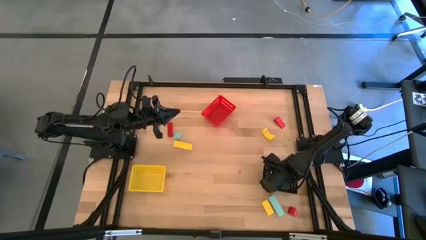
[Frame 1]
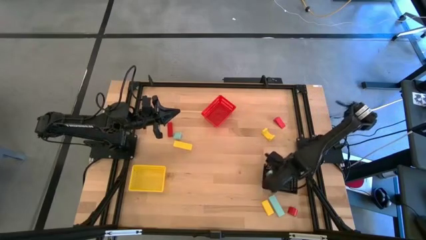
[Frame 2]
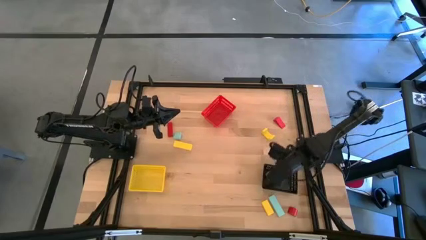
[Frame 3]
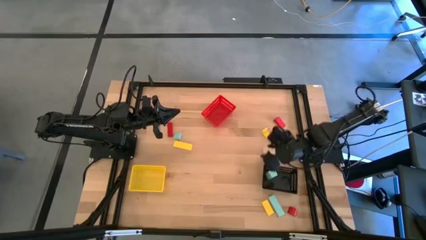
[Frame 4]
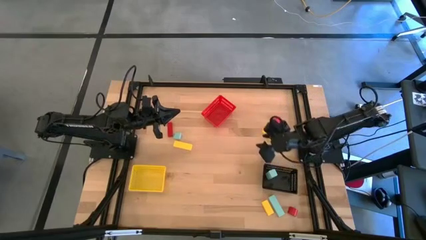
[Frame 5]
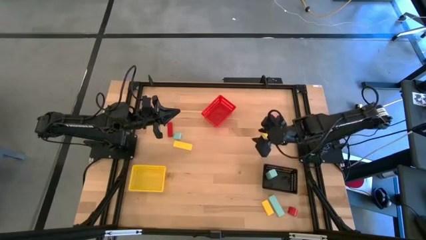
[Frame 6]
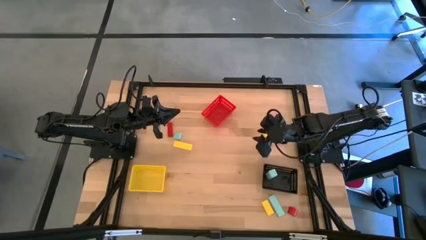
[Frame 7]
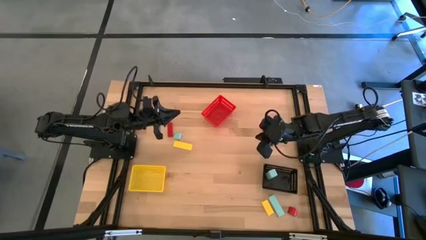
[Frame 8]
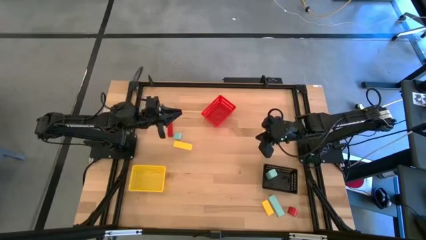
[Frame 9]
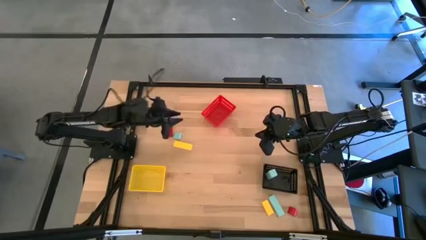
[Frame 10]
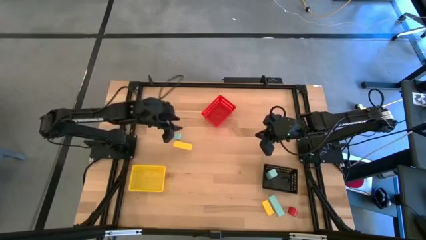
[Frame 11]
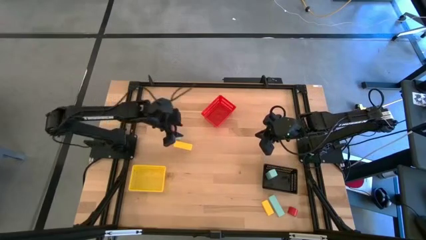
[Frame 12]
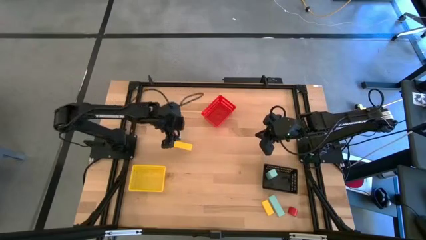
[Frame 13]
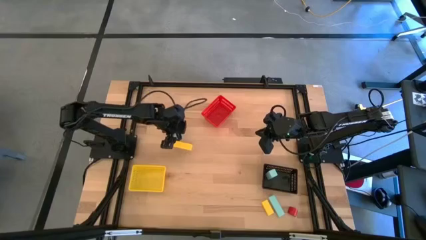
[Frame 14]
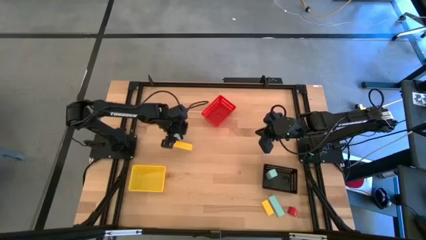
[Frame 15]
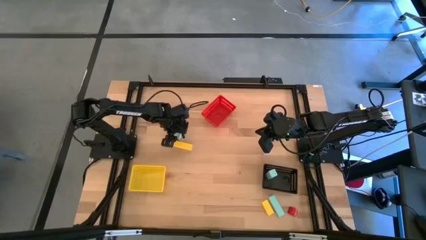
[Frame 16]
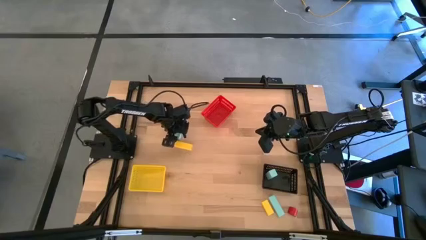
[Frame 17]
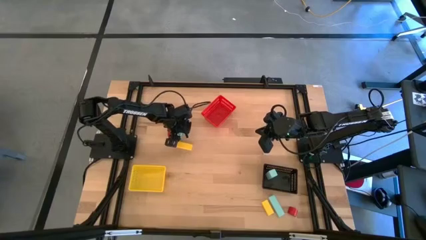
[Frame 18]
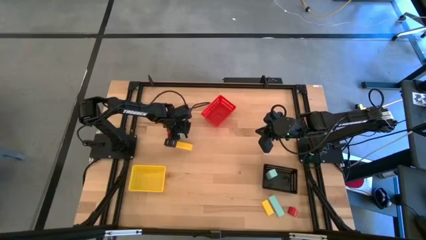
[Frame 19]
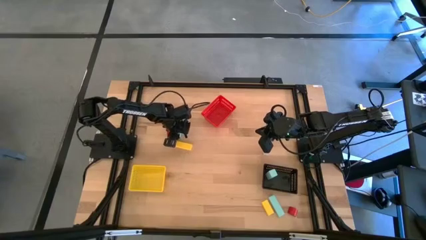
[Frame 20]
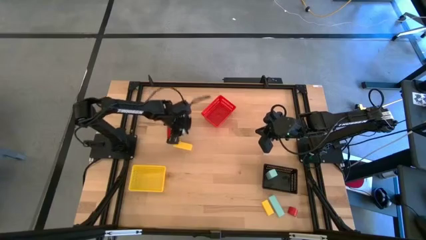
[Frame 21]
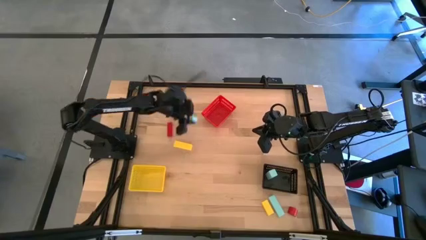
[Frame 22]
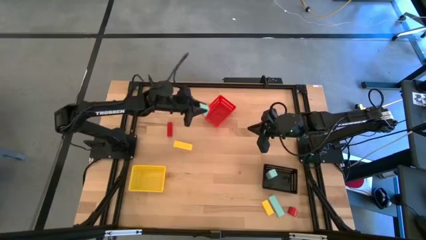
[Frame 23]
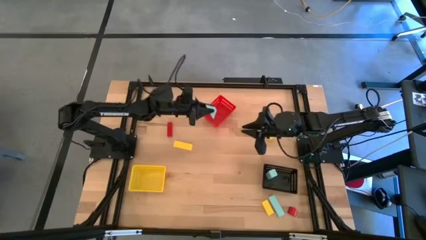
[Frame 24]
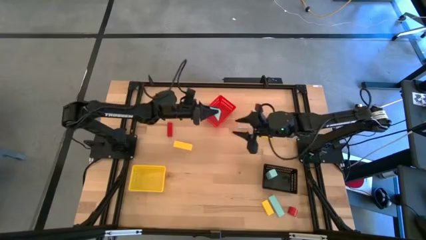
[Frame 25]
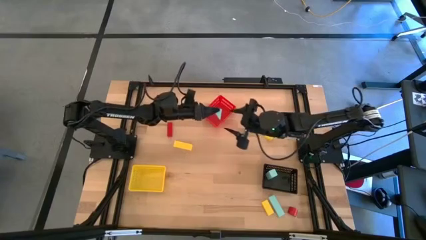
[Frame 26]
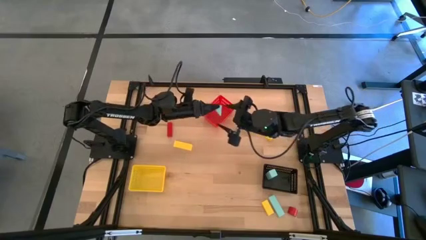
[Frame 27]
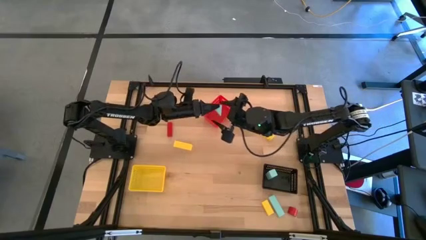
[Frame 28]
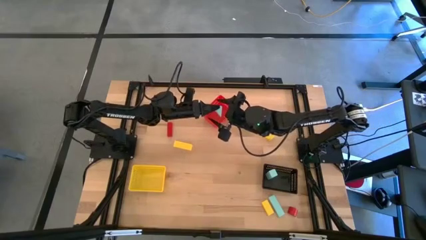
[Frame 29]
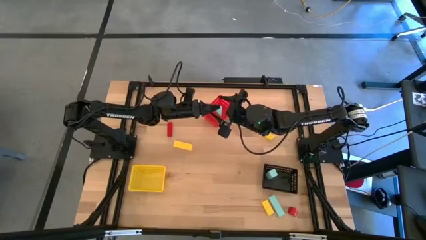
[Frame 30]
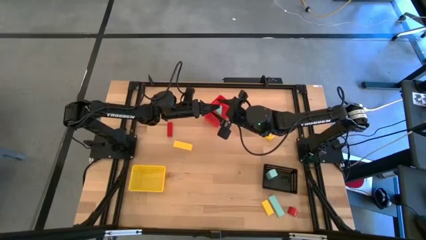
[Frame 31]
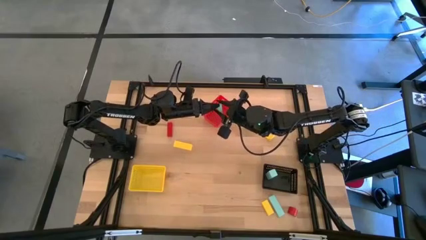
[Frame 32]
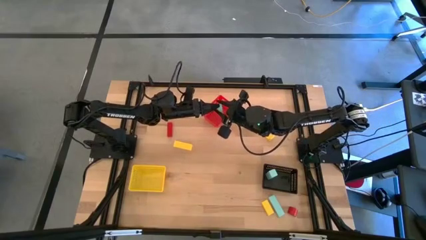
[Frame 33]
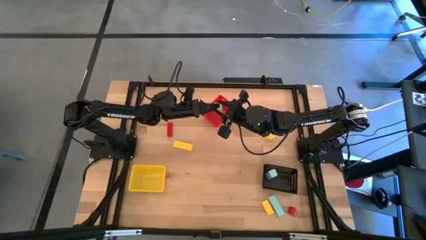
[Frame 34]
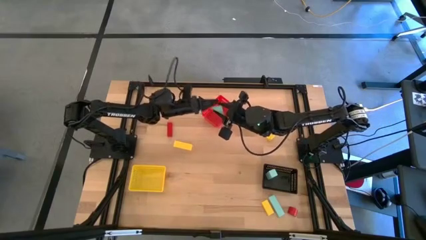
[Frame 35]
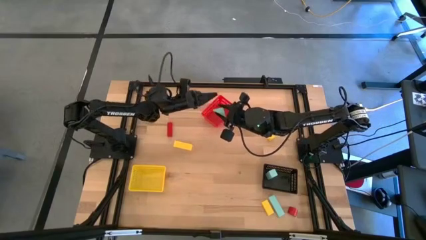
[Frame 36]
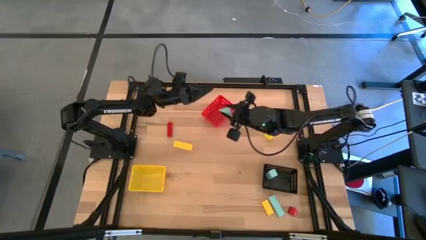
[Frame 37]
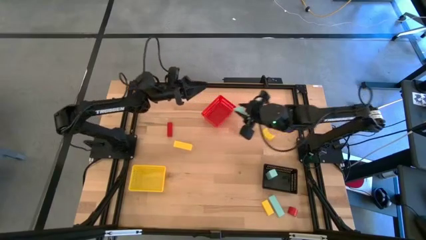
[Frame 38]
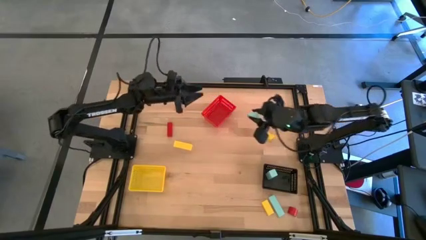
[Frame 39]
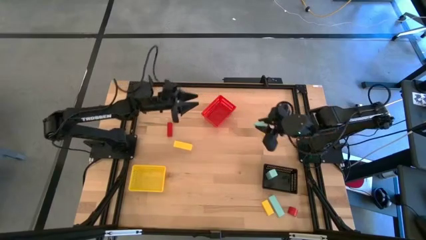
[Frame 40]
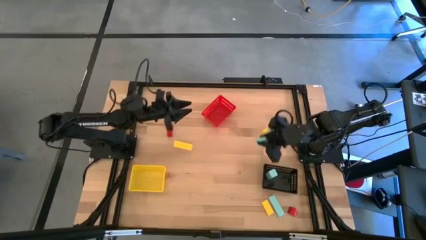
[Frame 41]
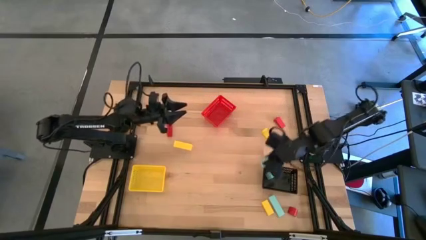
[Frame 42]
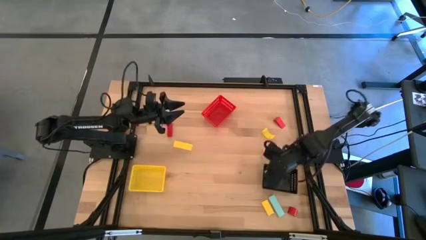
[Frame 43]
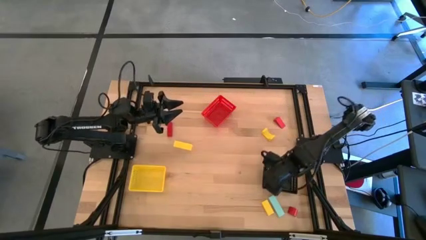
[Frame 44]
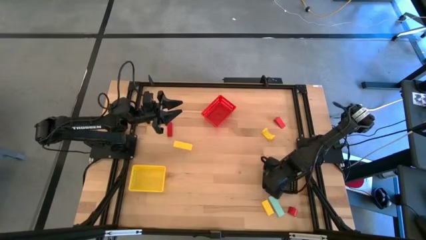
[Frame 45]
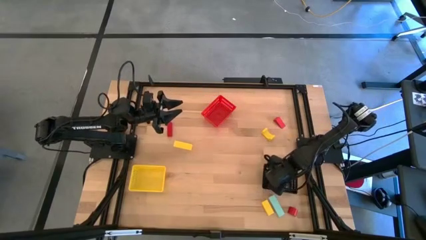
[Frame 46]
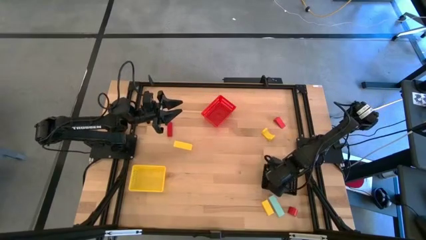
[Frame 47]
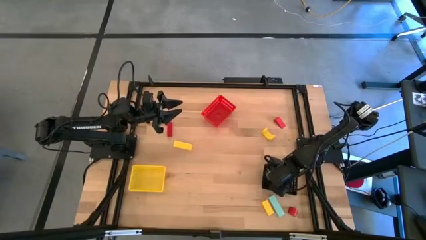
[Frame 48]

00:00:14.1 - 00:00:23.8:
Task: Sort & place blocks by color
Put the top light blue block into the black bin

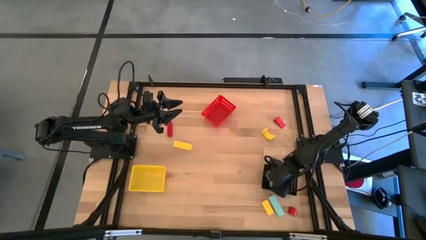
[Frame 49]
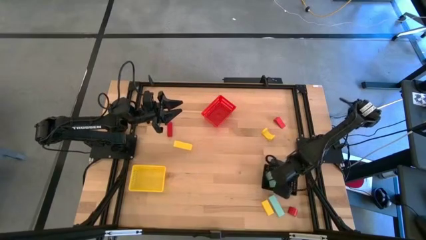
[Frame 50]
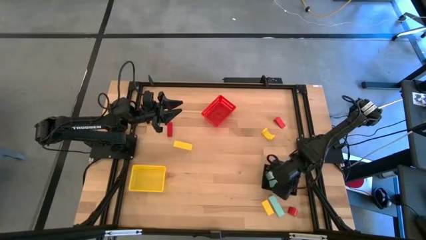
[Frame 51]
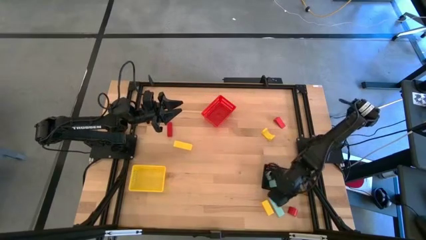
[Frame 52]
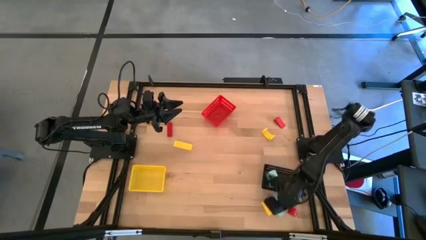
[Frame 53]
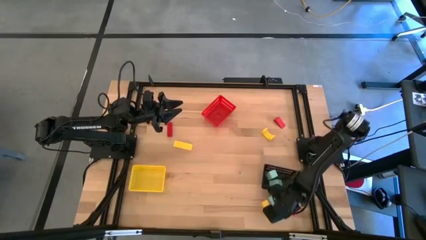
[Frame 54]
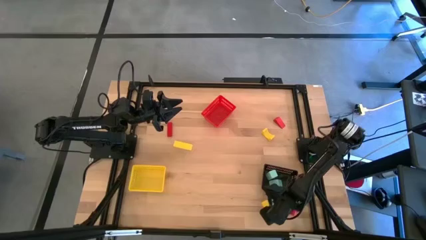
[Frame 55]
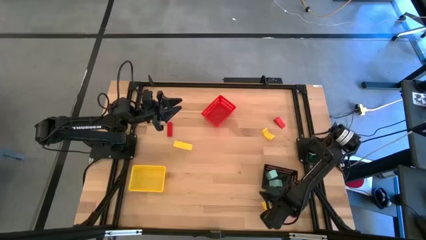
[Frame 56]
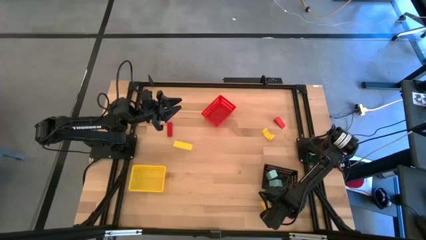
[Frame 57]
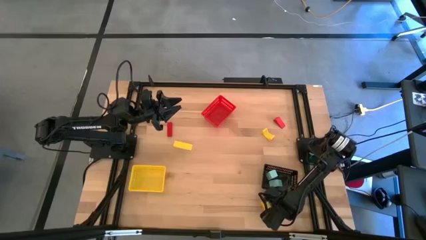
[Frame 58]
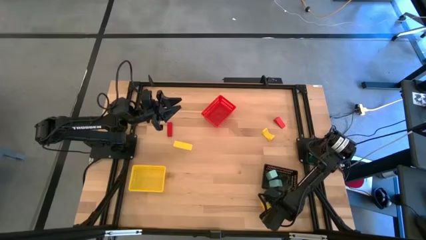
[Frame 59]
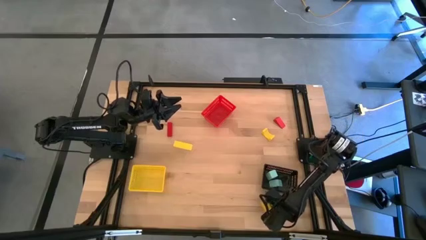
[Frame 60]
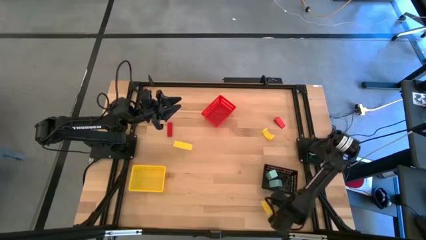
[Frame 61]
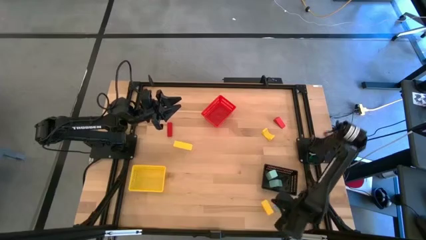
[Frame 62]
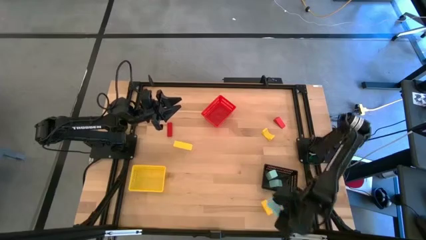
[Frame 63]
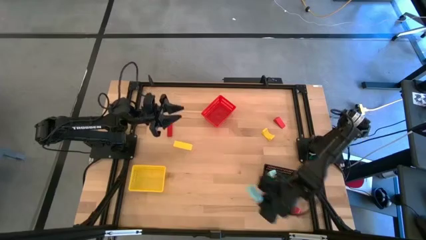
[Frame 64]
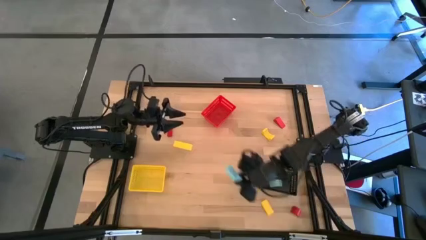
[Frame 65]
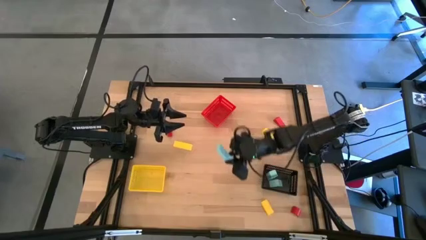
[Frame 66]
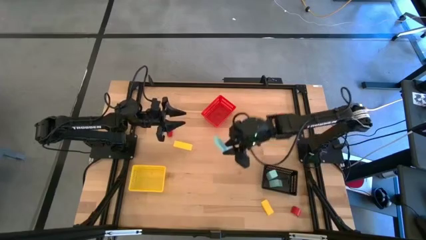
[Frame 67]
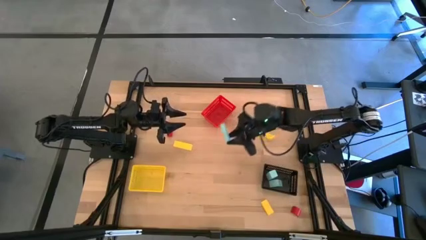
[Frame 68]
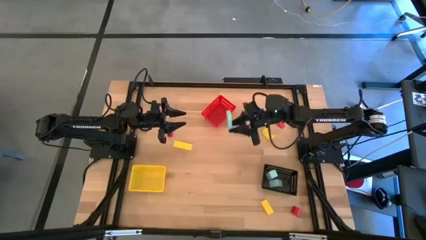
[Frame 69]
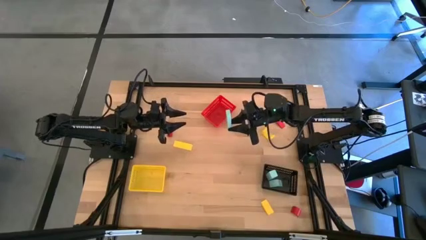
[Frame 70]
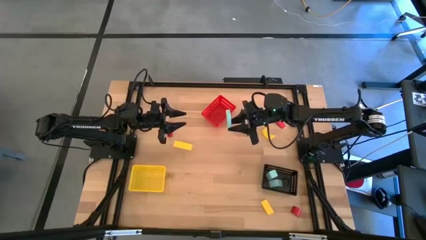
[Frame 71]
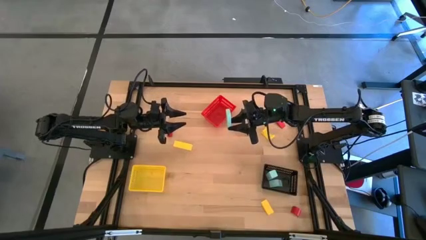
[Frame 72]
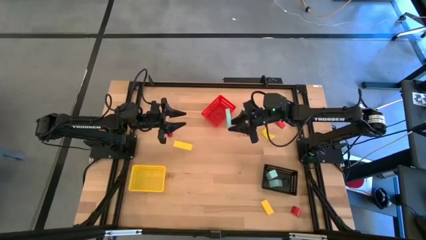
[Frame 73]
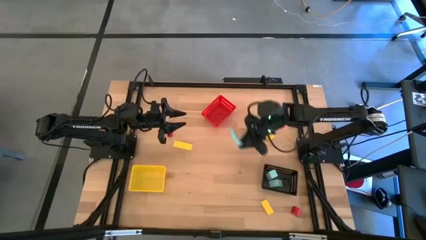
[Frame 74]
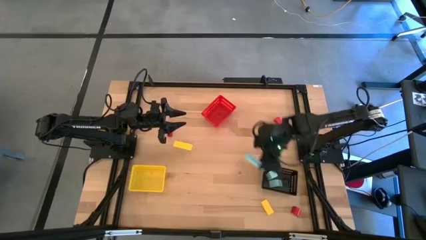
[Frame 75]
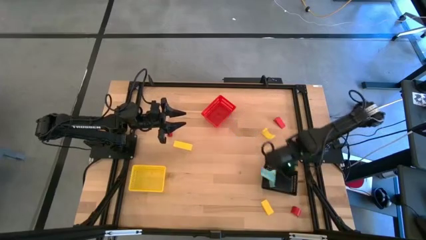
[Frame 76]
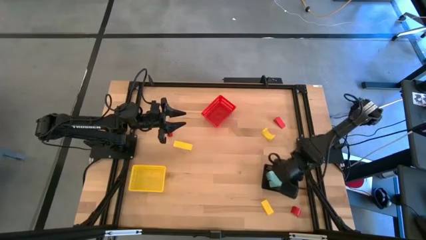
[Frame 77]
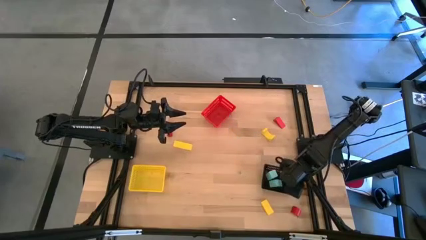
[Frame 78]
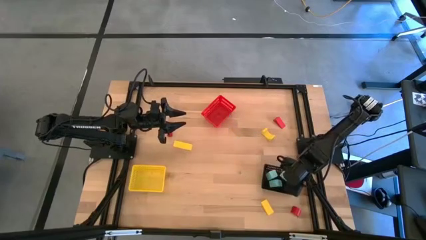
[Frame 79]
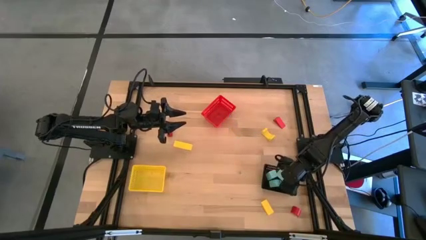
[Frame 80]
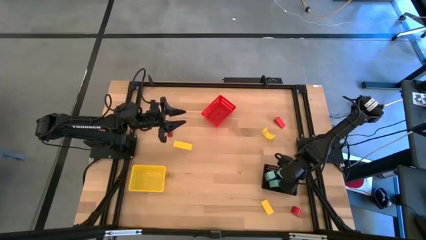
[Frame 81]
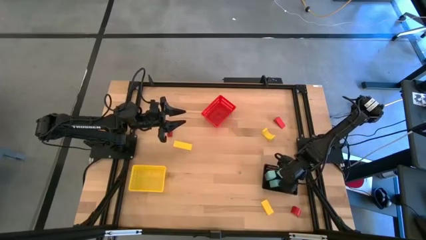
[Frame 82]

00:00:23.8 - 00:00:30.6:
Put the light blue block into the black bin

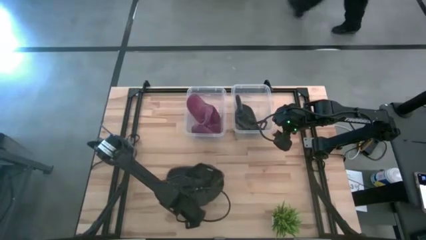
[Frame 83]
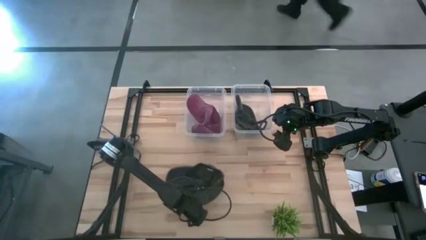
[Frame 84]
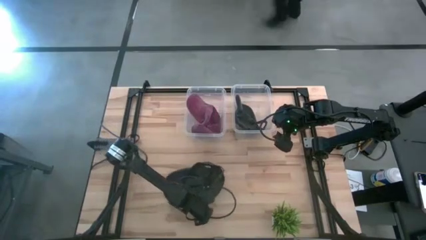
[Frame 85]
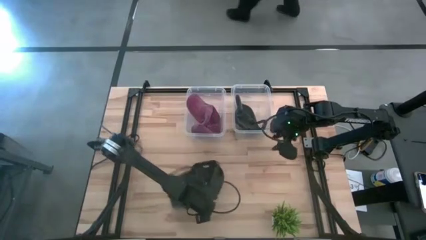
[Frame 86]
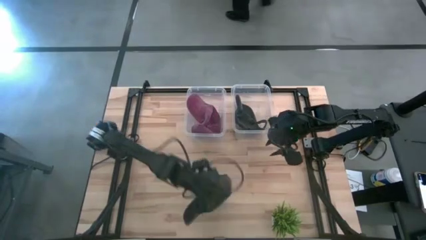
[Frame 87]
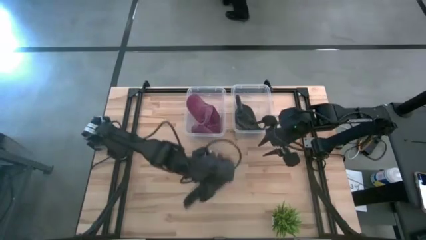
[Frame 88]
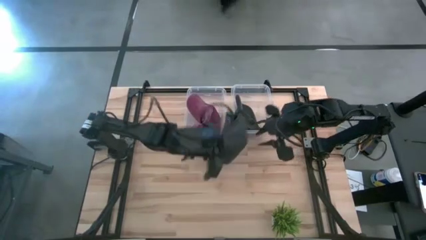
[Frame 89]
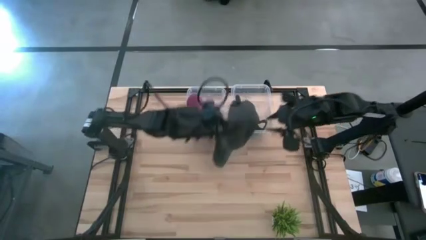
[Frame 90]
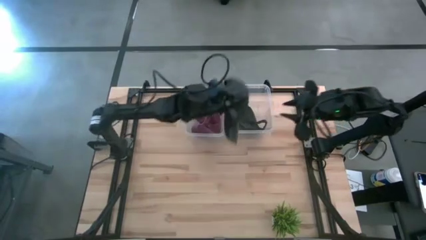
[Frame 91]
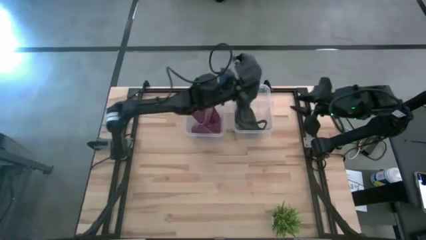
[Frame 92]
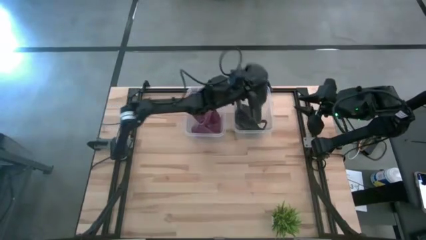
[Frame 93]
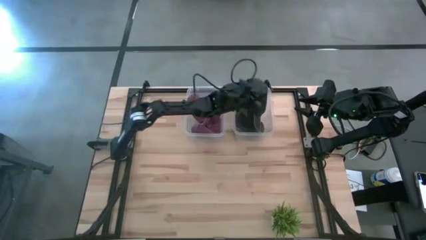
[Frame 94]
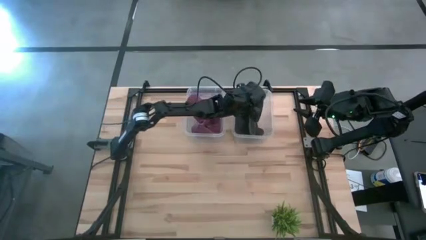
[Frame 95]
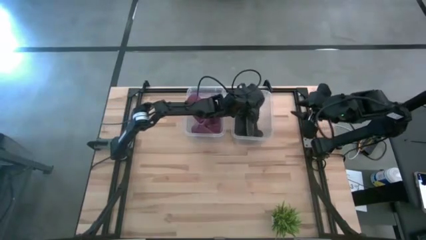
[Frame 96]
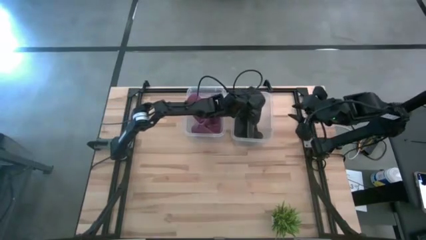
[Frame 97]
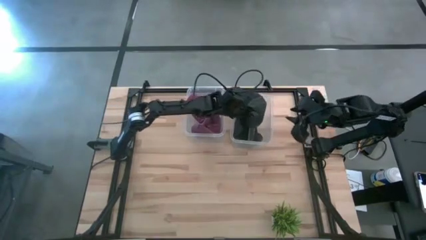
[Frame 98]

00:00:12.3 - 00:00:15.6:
Task: Pick & Place hat
Put the dark gray cap into the right transparent bin
